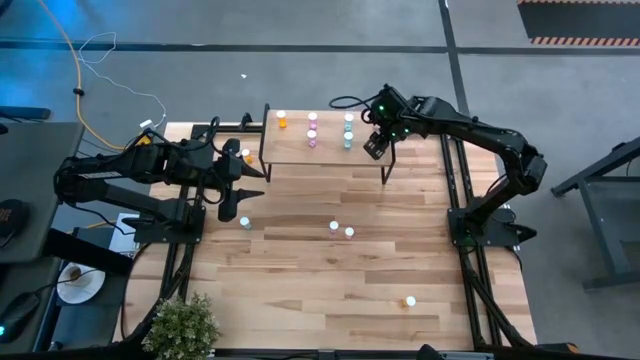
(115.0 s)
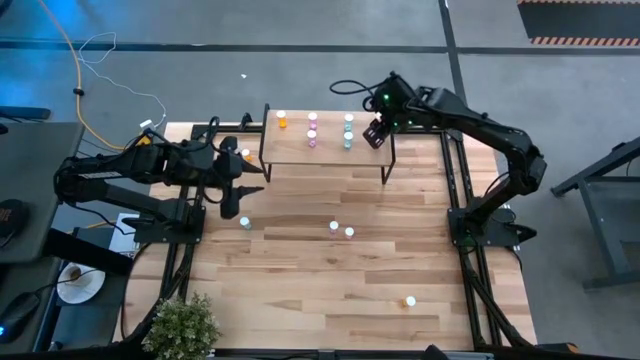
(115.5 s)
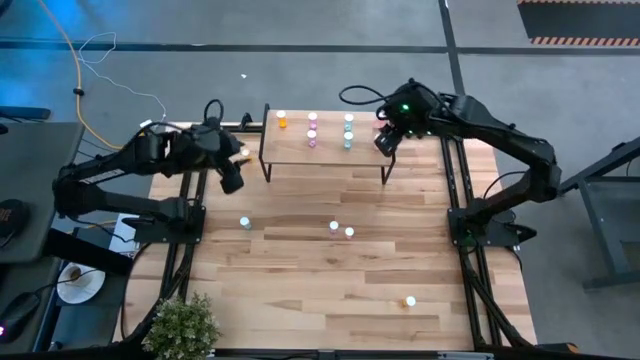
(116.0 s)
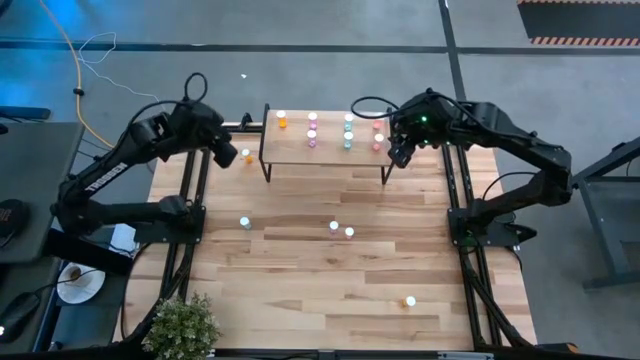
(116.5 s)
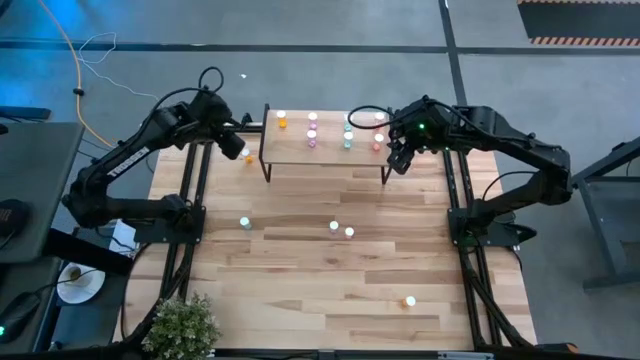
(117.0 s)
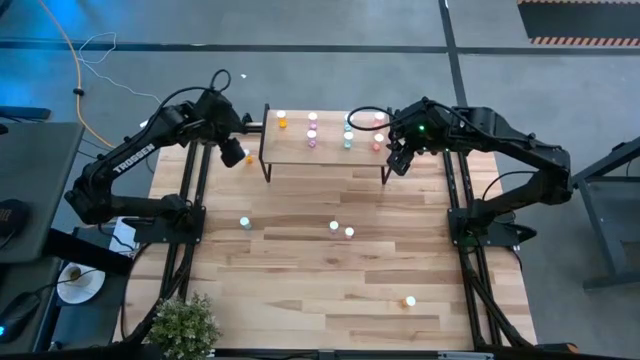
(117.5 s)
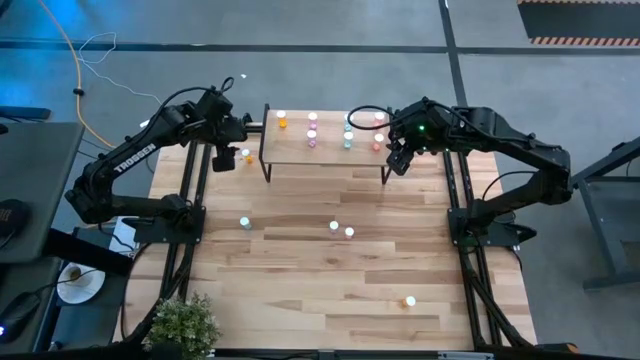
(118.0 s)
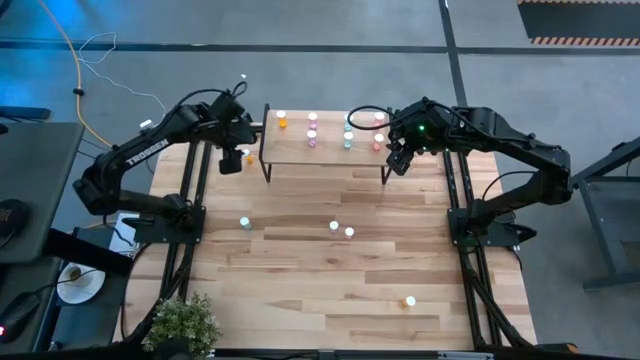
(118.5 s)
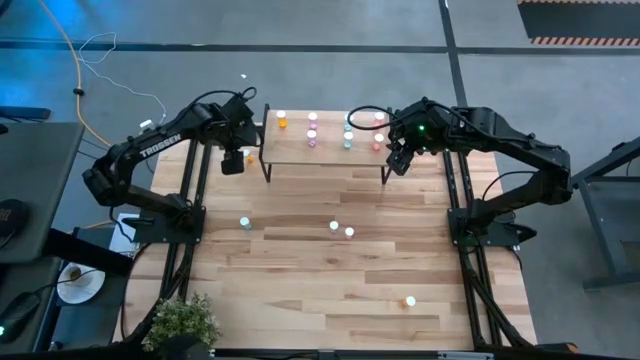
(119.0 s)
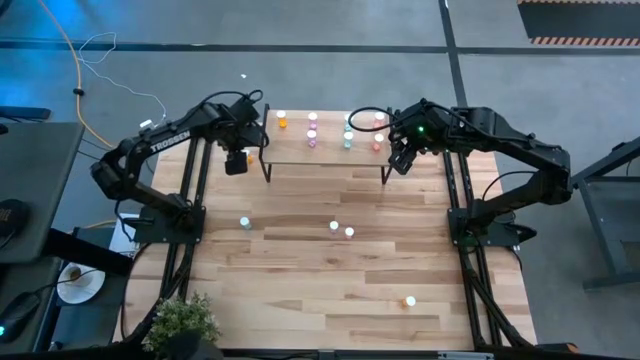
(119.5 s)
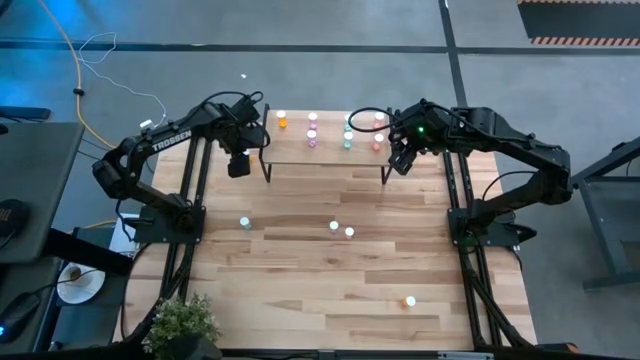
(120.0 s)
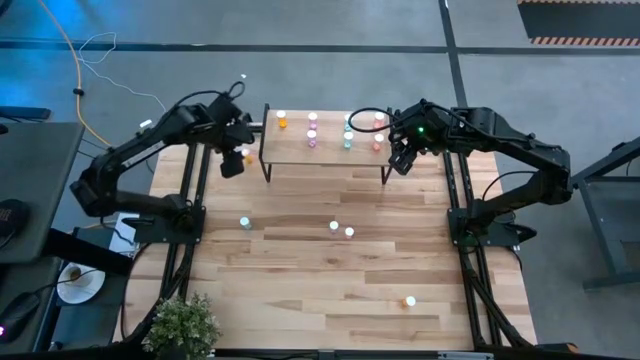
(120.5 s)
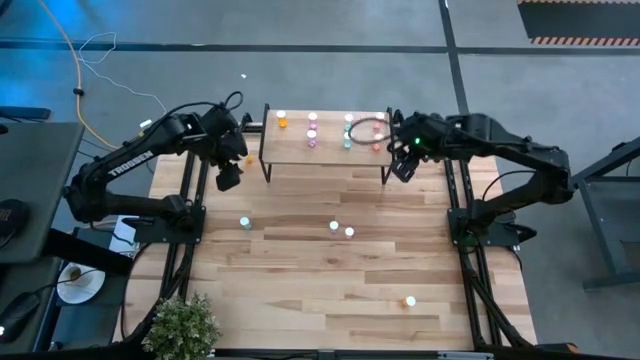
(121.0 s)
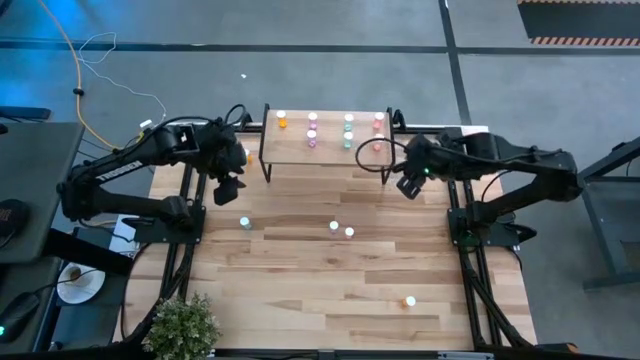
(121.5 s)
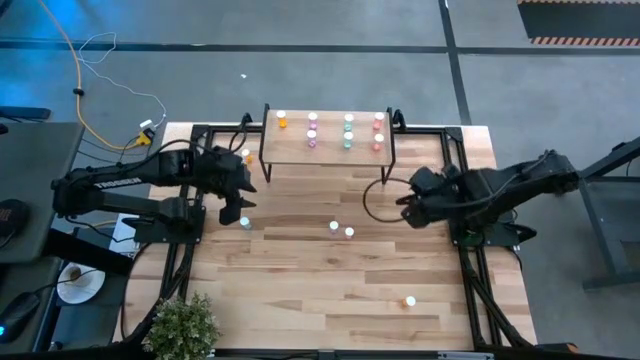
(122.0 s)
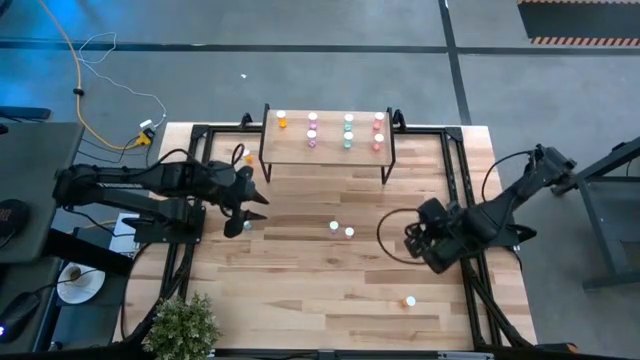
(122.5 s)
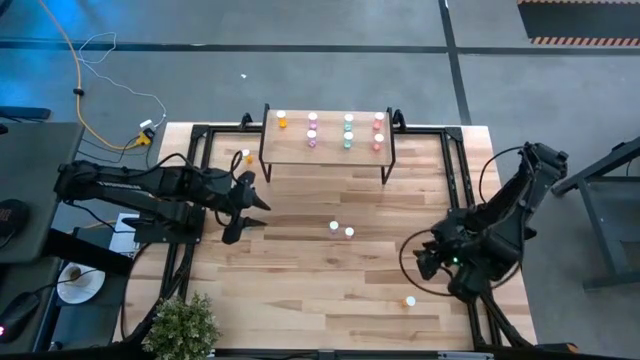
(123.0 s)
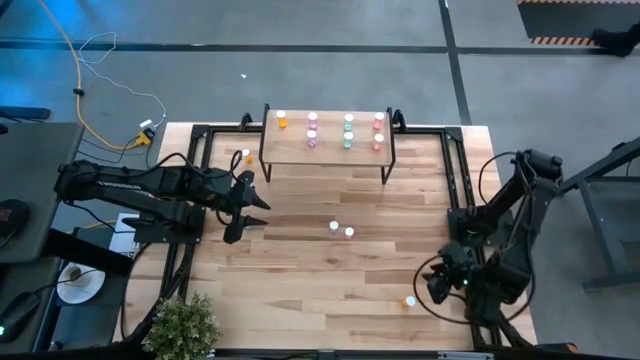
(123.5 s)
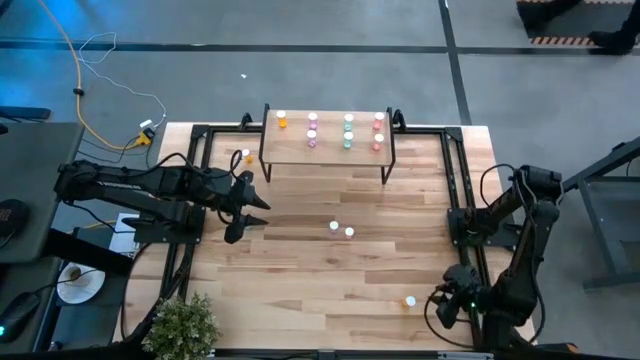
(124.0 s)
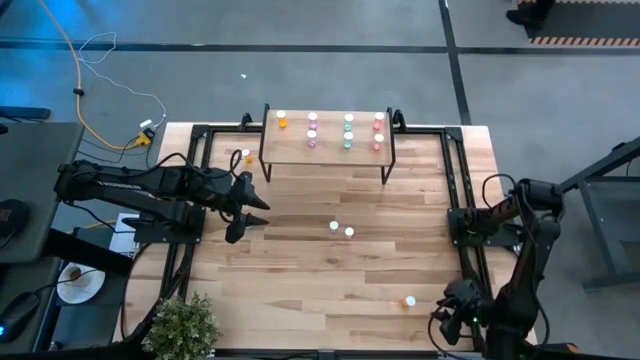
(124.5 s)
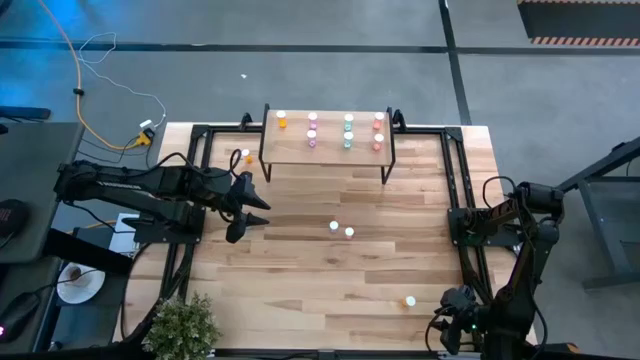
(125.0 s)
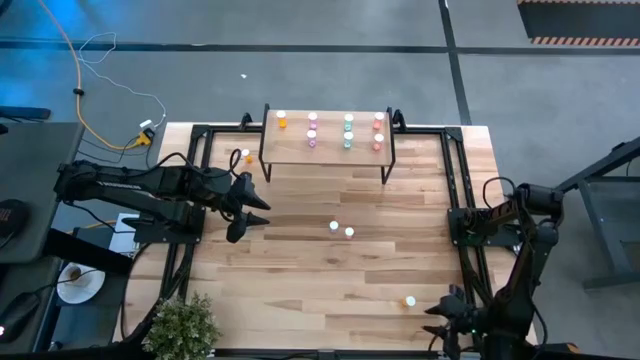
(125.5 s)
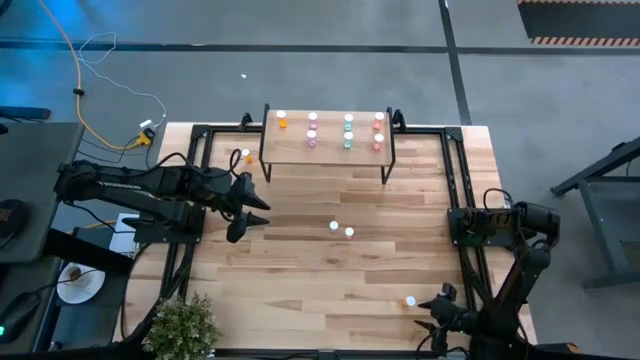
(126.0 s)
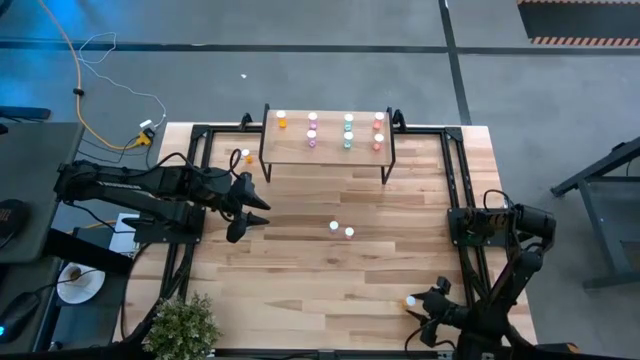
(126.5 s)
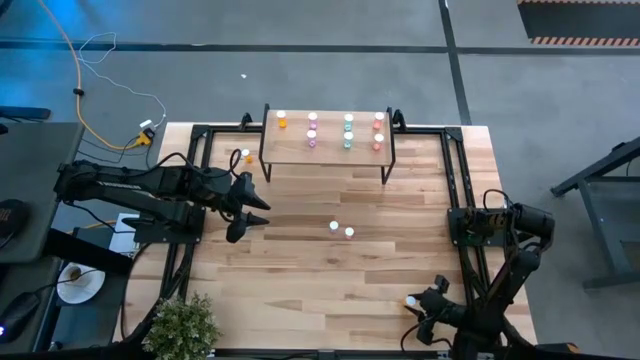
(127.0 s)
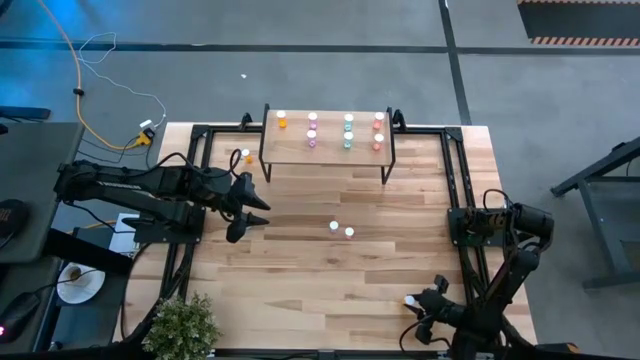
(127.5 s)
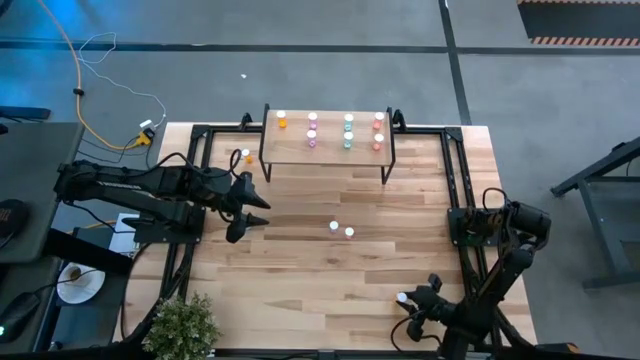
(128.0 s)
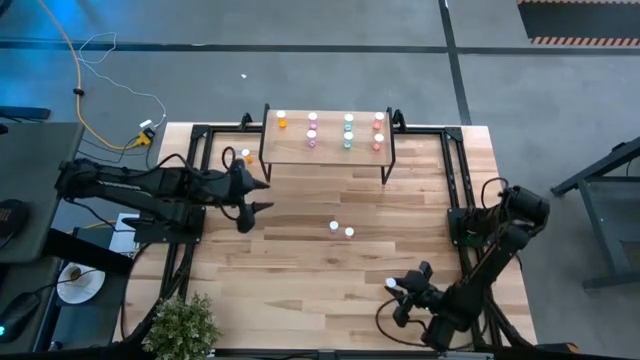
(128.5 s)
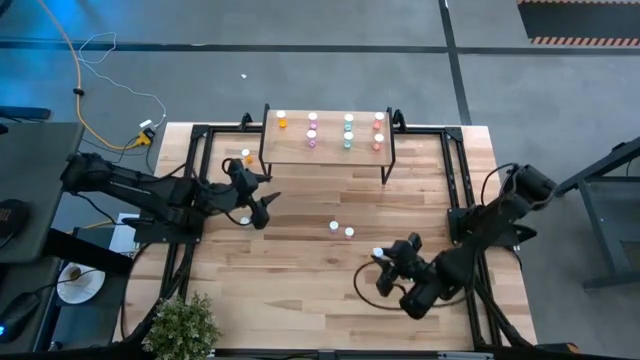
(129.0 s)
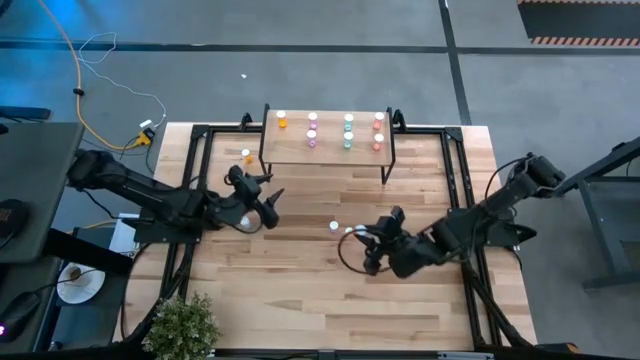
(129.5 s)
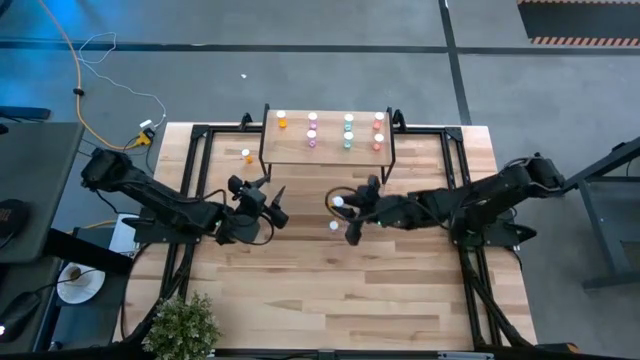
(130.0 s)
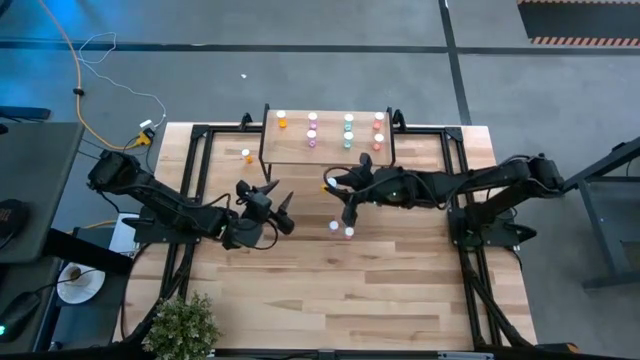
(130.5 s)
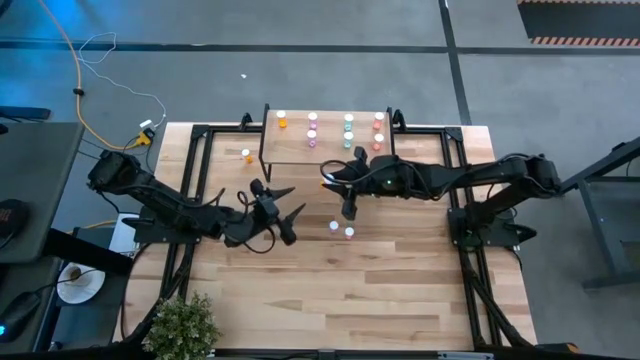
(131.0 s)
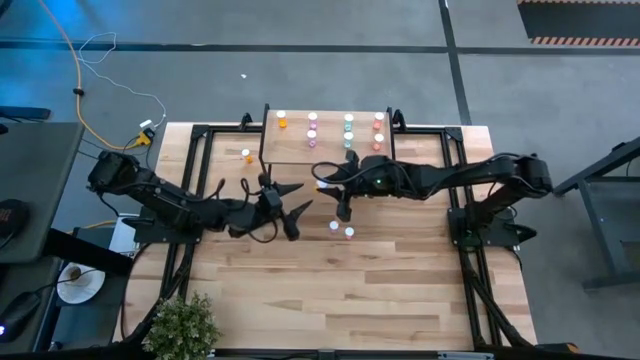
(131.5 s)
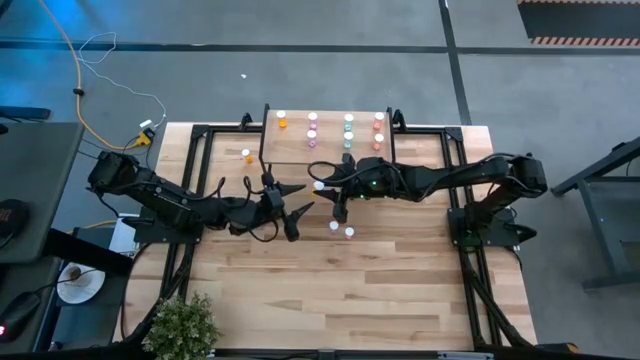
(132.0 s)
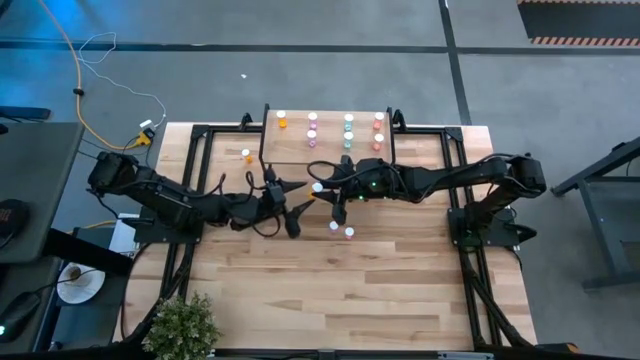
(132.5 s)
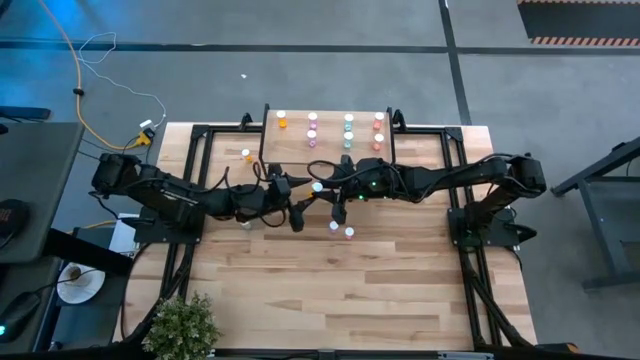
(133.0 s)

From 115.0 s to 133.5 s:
Task: Pick and place medicine bottles onto shelf by color
Put the bottom orange pill bottle on the shelf aligned with the other orange pill bottle

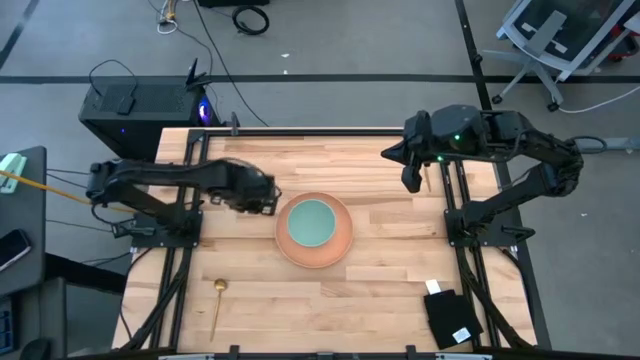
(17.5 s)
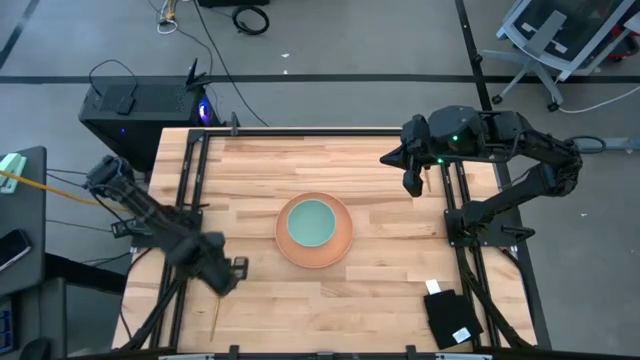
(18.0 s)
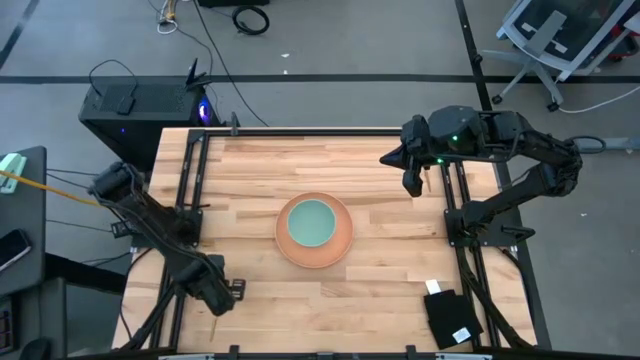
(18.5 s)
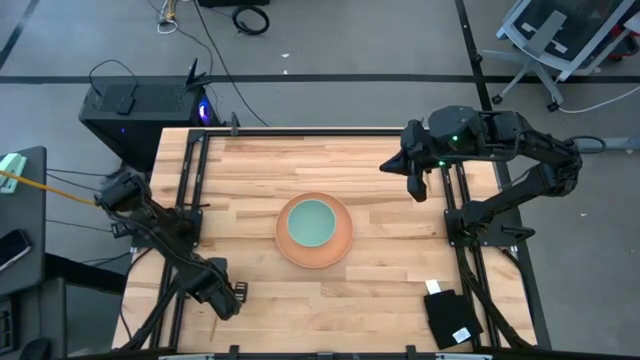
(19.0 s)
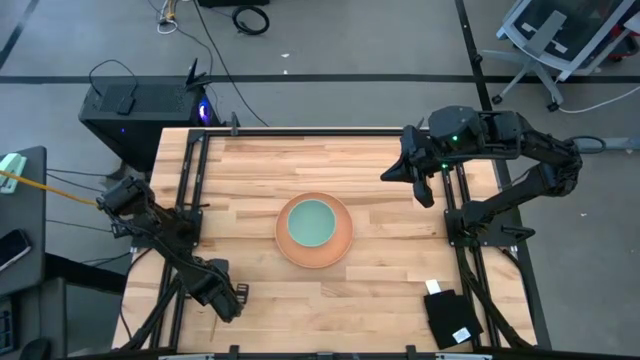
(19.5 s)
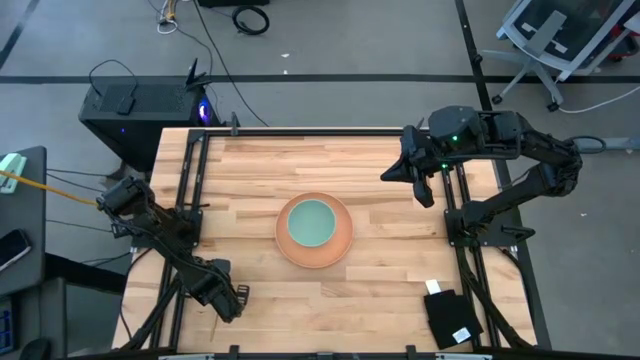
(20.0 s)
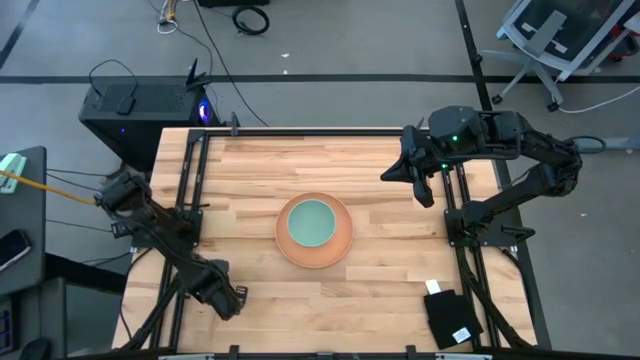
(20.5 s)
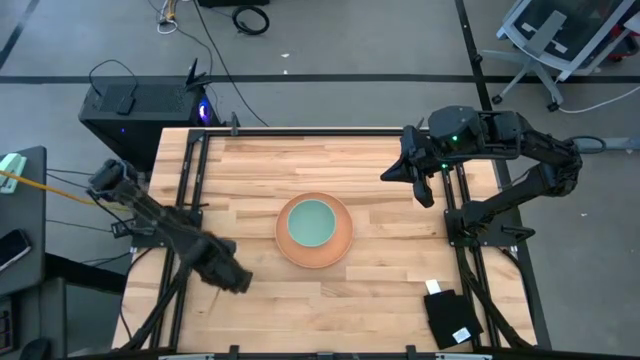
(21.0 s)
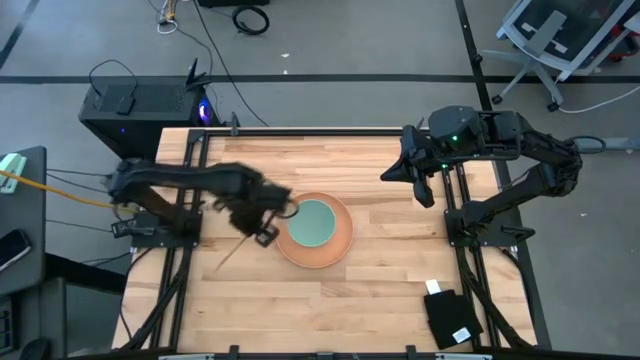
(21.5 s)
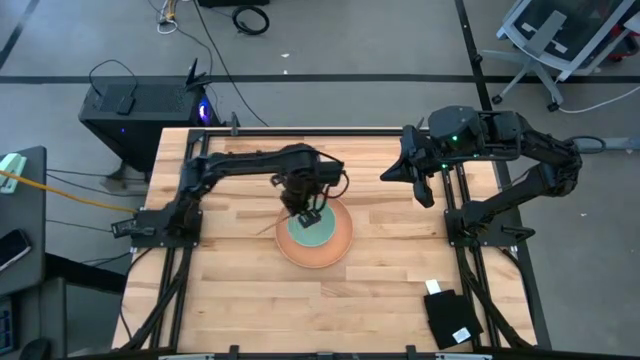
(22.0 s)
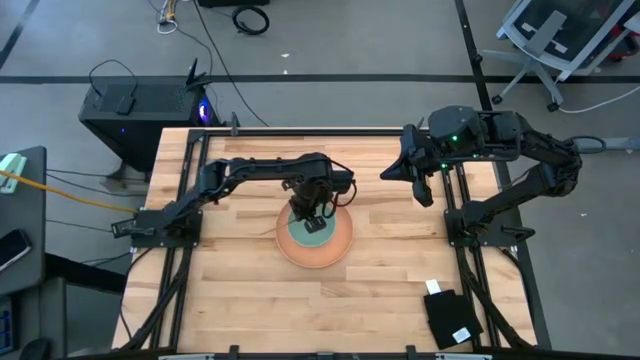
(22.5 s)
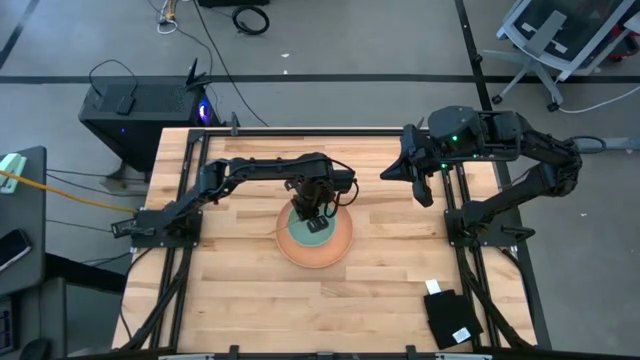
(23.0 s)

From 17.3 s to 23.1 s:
Task: Set table place
Put the spoon into the bowl
